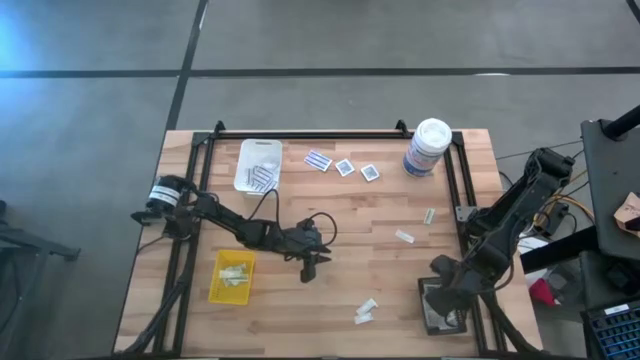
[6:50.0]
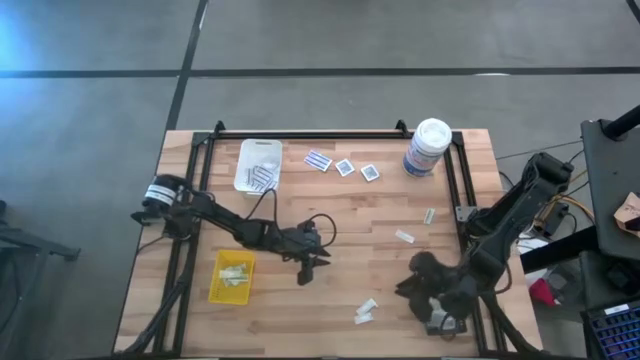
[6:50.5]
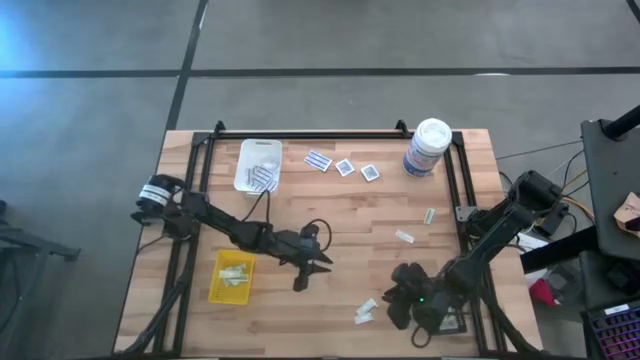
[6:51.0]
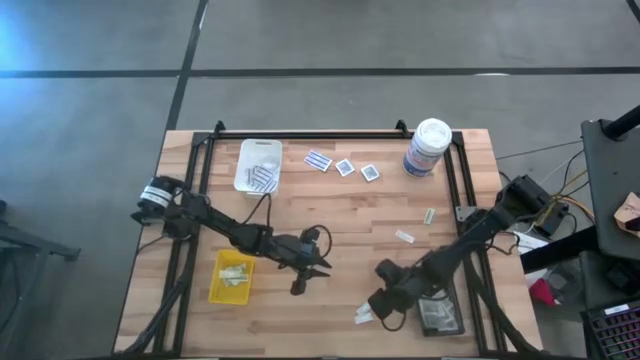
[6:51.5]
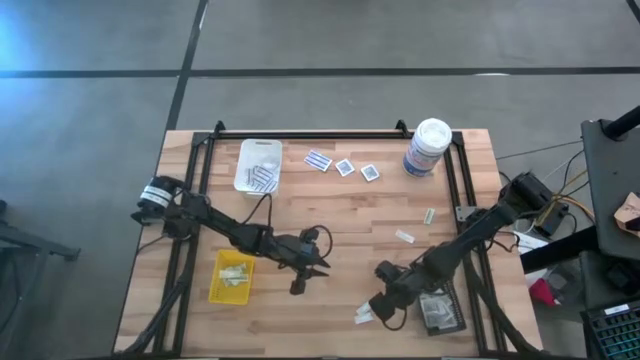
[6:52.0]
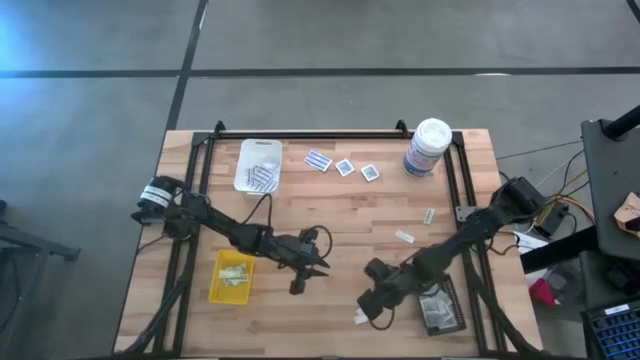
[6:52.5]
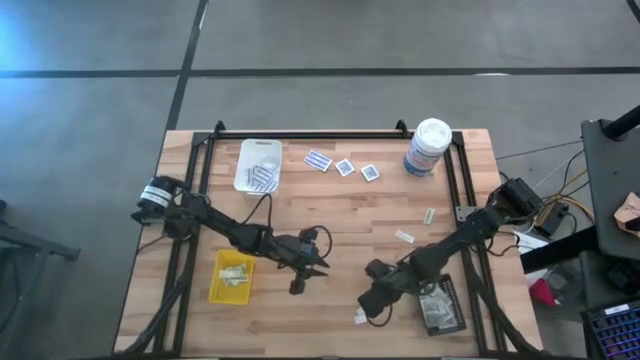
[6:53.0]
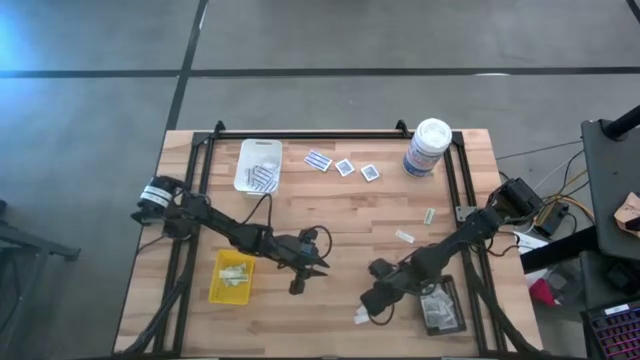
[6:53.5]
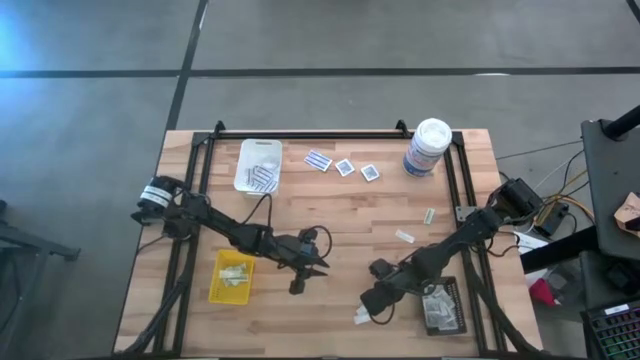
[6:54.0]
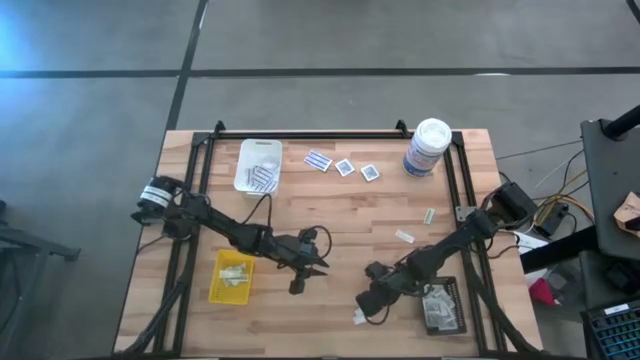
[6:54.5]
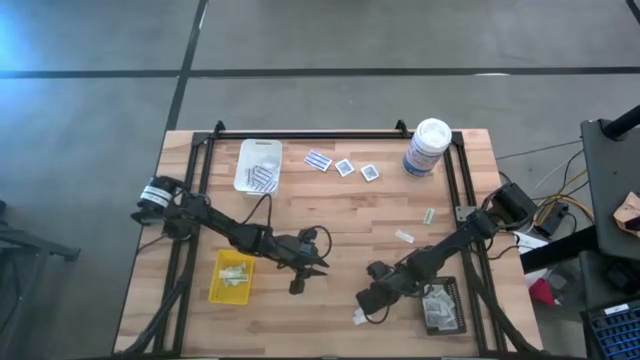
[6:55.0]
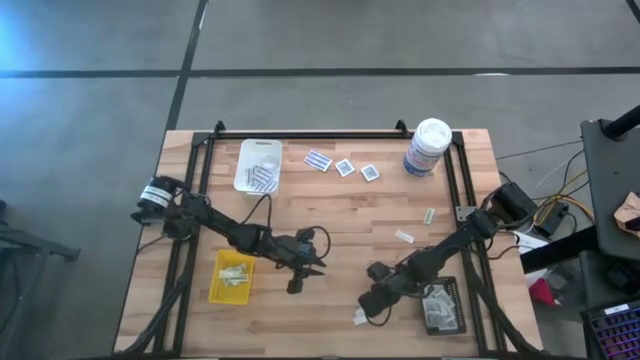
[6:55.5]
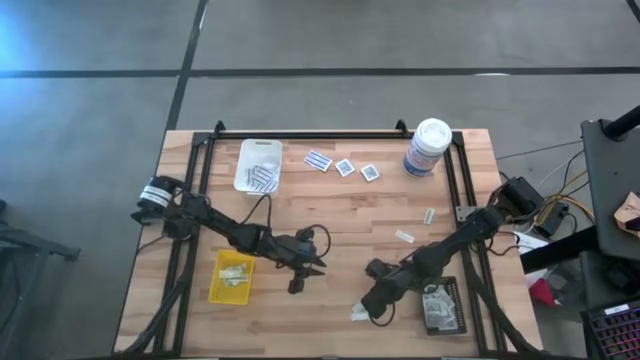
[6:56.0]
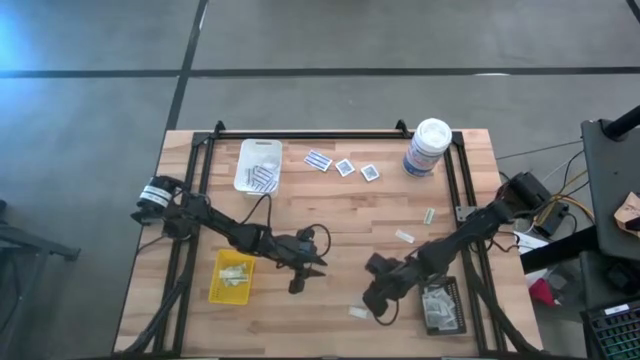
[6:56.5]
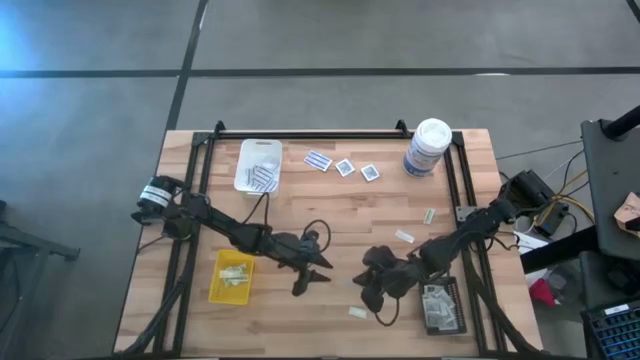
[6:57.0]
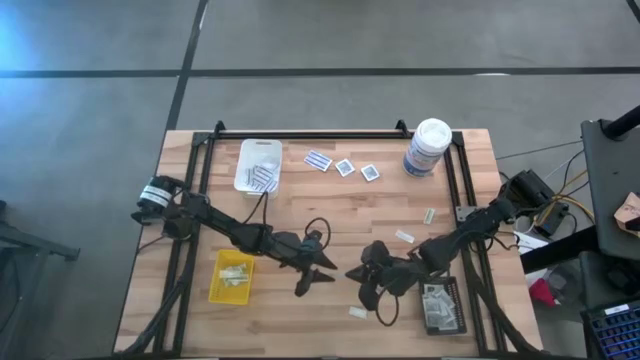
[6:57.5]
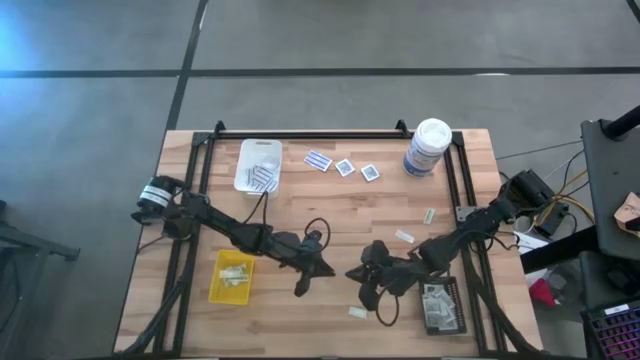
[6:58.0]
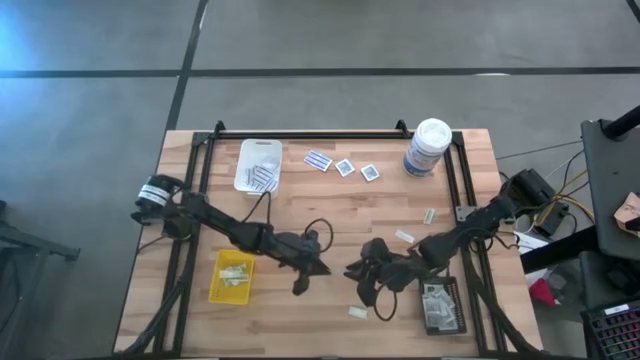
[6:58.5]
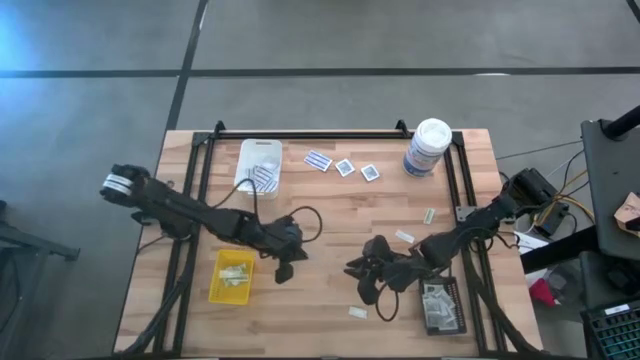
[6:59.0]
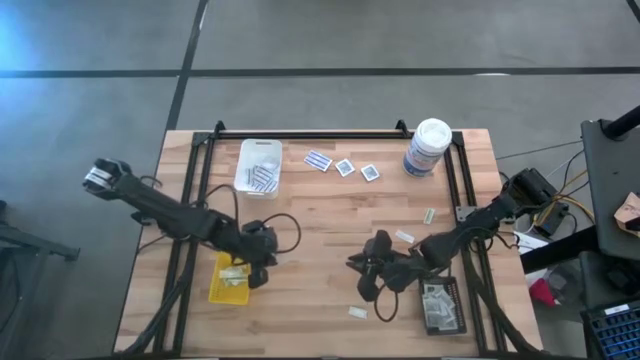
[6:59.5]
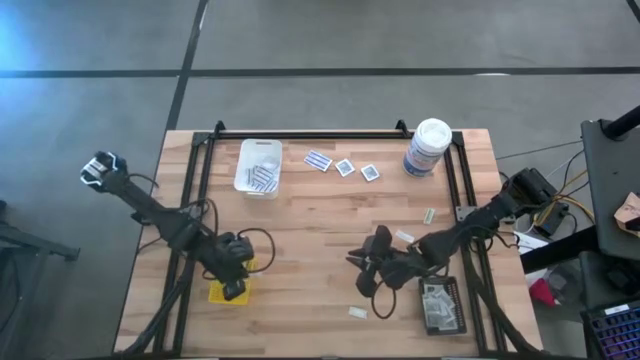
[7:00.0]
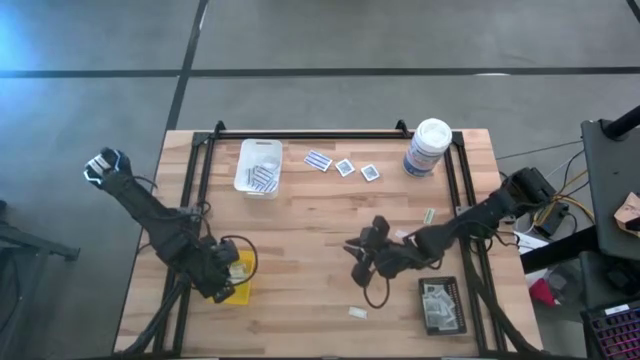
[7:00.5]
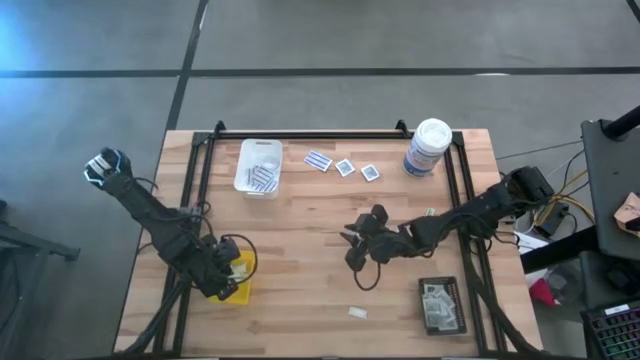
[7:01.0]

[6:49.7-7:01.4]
Task: Pick & Place First Aid Supplies
Put the green bandage into the yellow bin

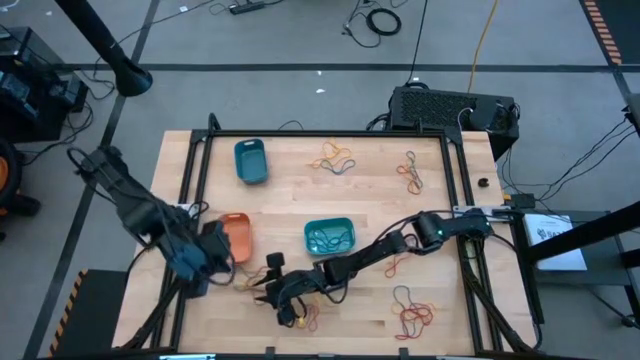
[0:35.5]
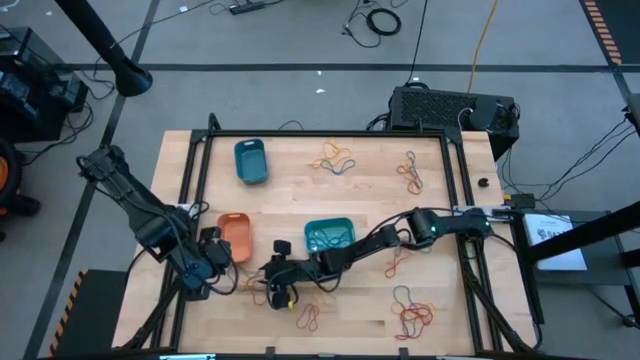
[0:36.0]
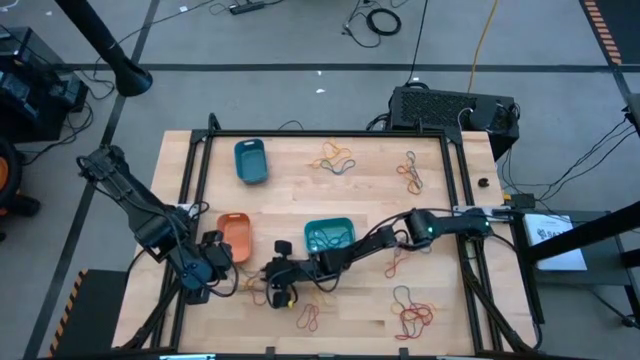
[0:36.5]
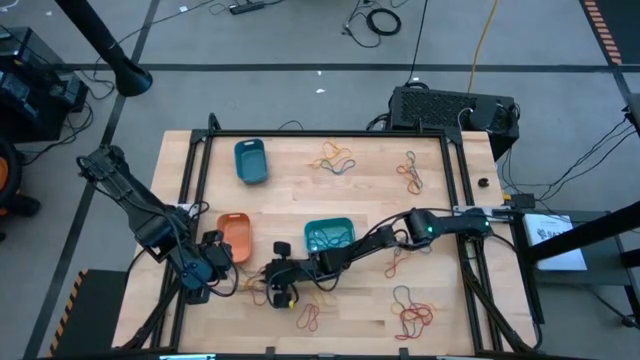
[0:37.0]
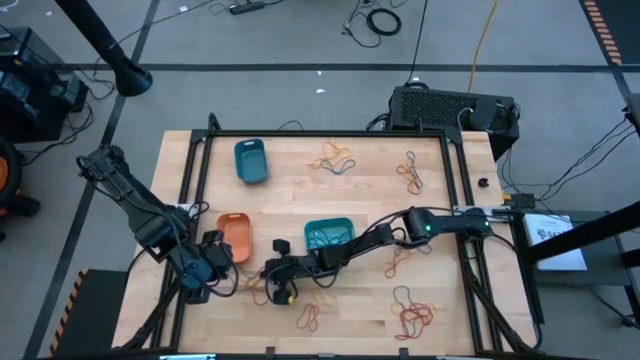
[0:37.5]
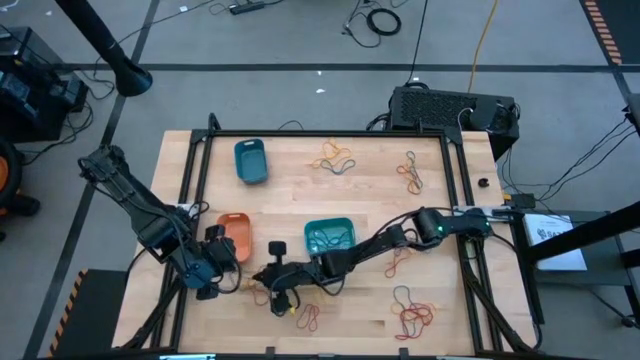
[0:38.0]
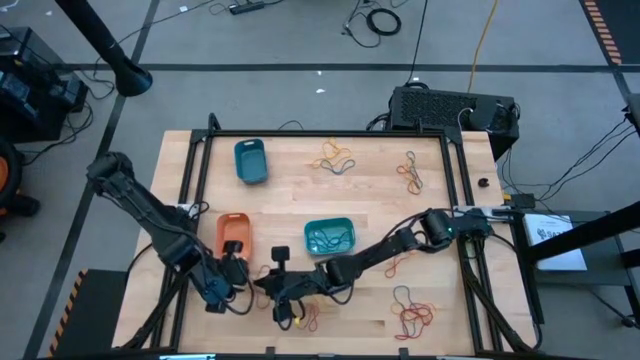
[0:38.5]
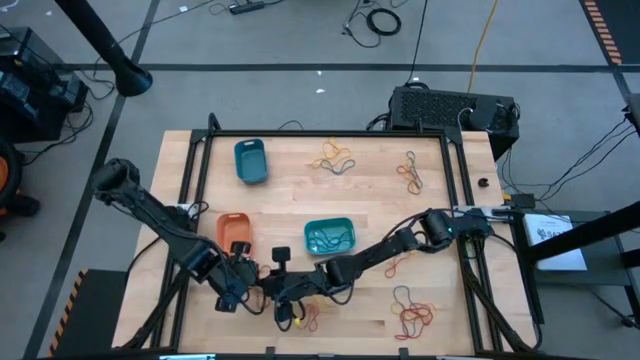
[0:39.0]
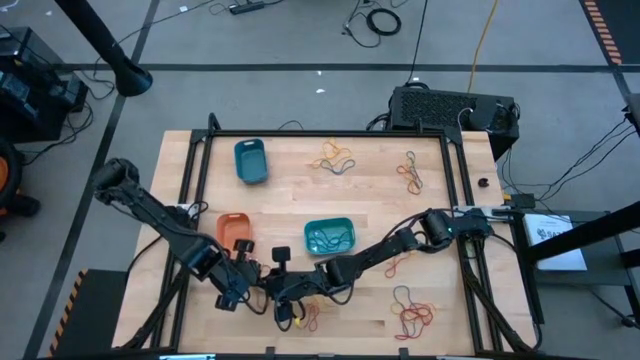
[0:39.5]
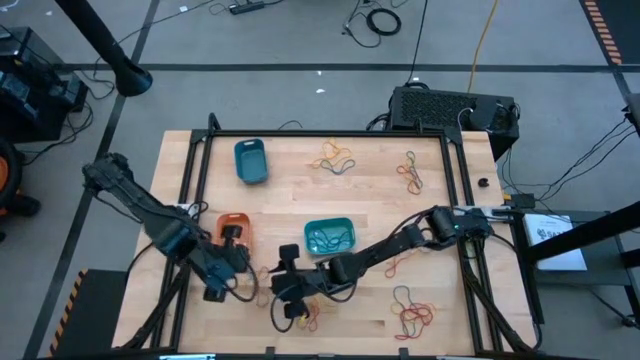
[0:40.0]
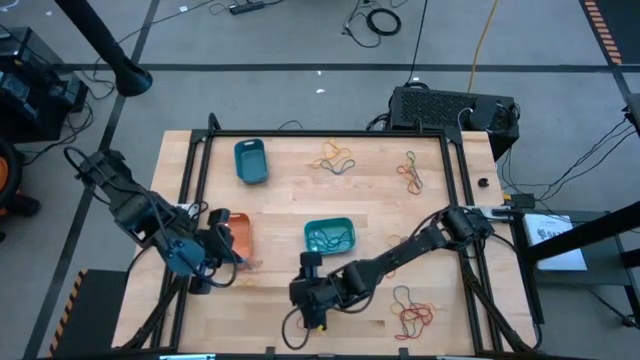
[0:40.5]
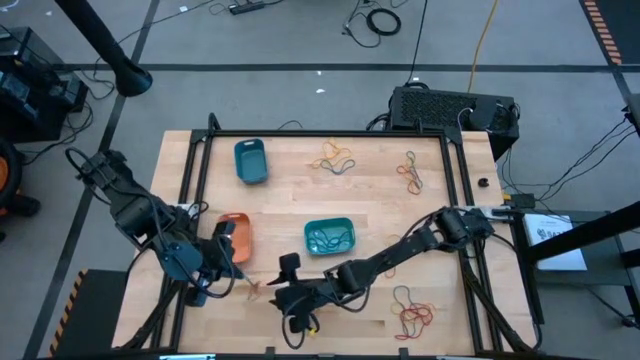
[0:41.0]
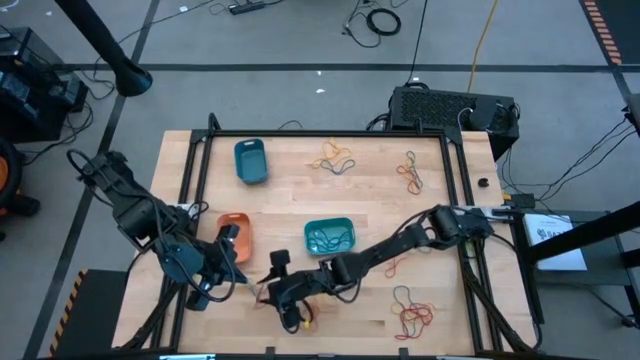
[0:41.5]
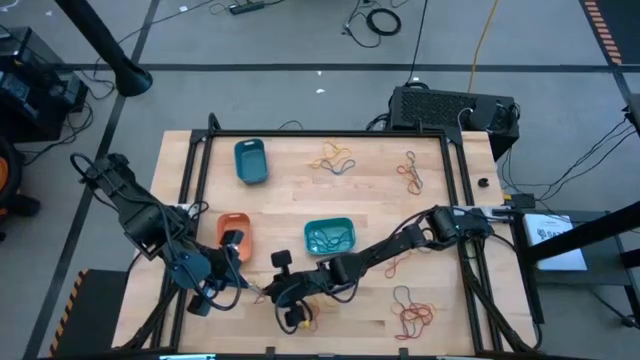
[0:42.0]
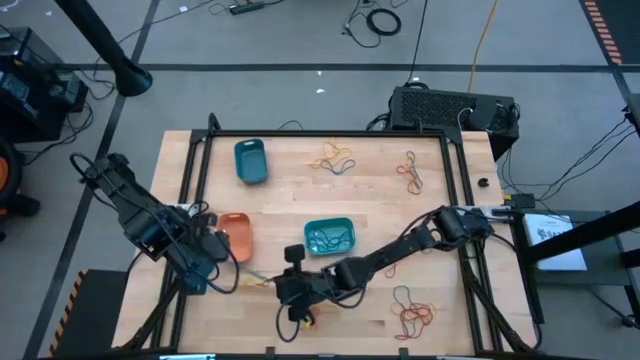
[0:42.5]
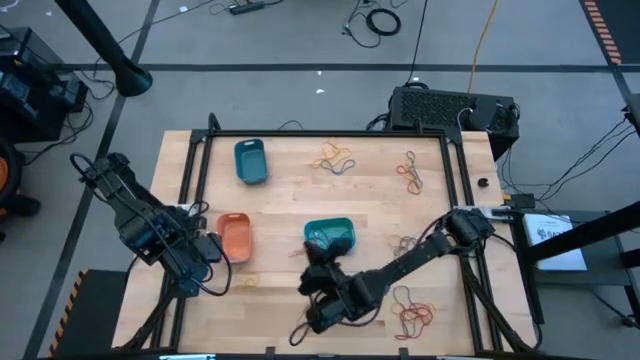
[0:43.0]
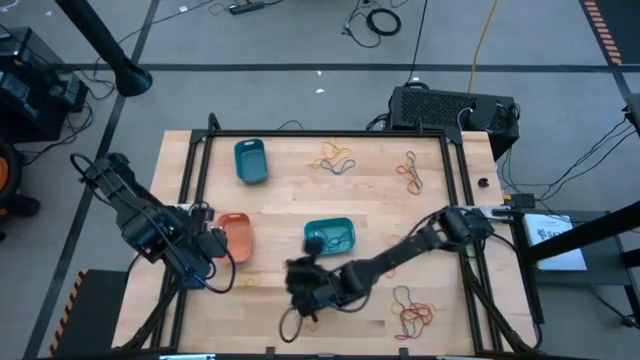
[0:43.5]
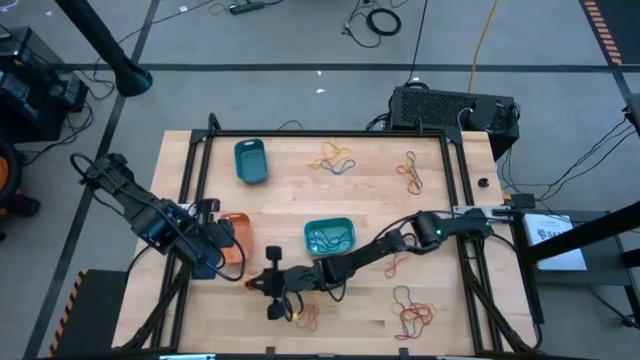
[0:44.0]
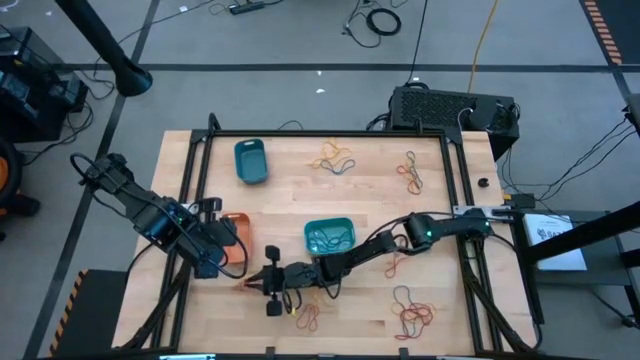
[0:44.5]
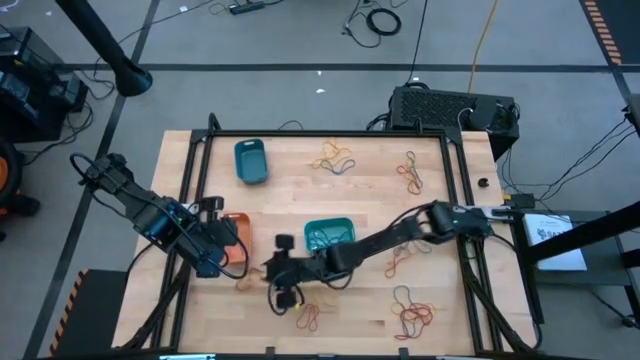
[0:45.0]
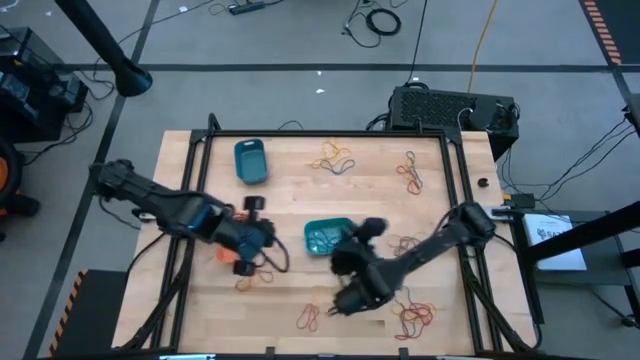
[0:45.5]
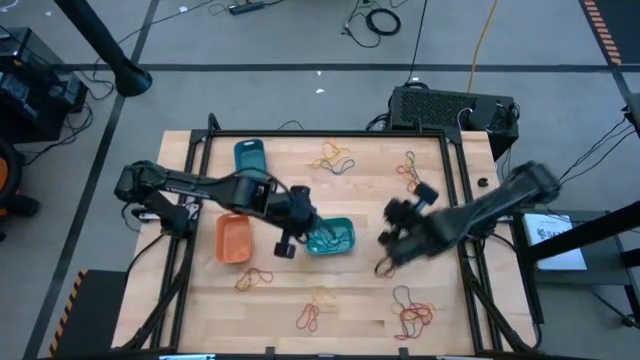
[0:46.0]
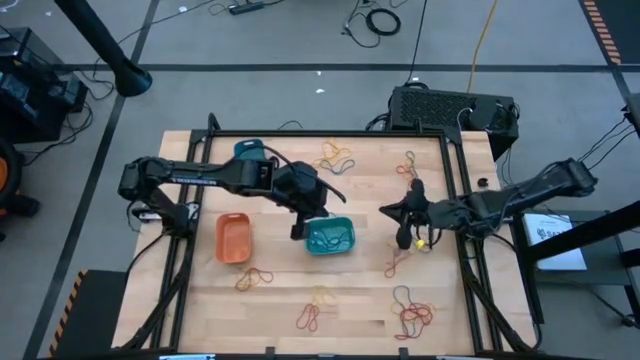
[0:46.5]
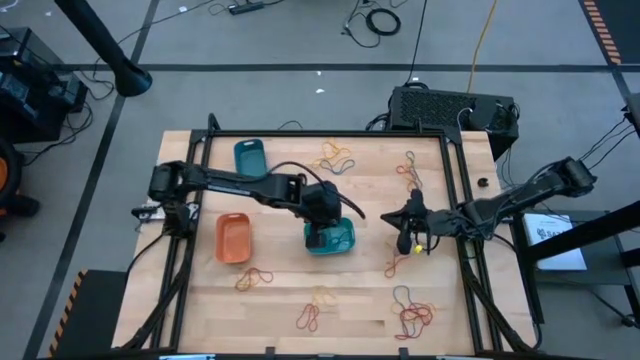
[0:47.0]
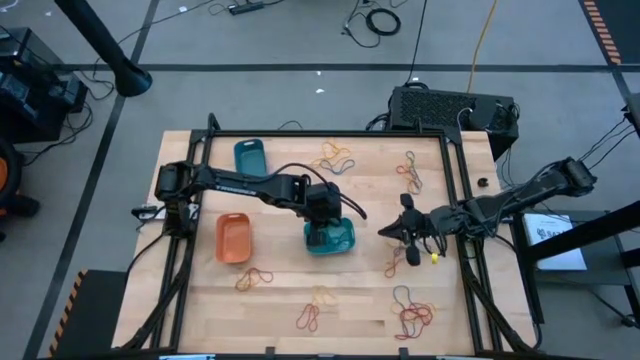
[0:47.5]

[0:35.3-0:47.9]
Task: Sort rubber bands into baskets
Put the blue rubber band into the green bin
